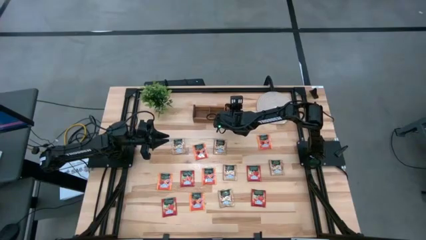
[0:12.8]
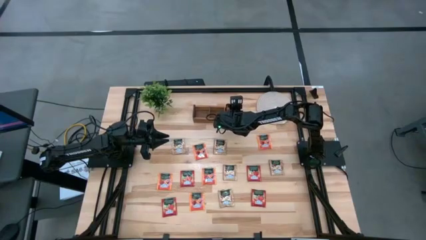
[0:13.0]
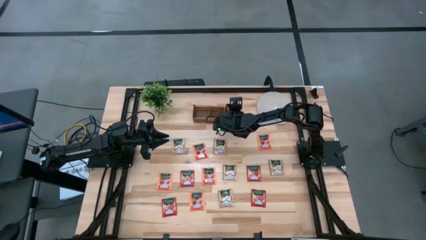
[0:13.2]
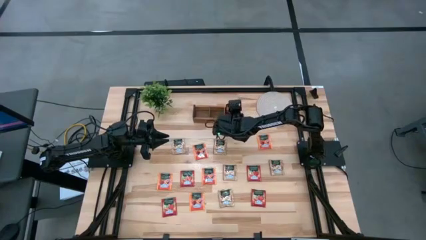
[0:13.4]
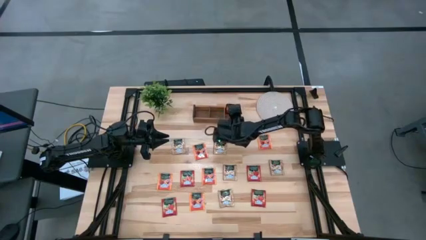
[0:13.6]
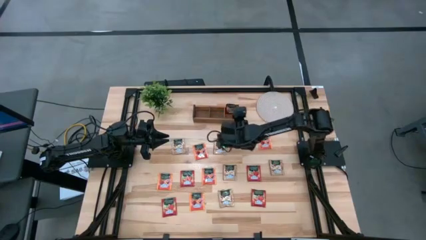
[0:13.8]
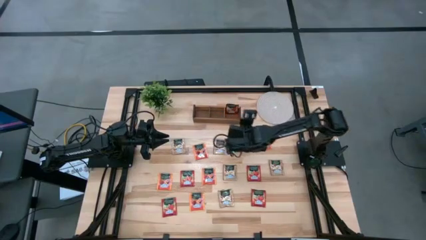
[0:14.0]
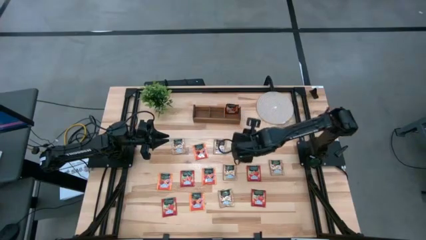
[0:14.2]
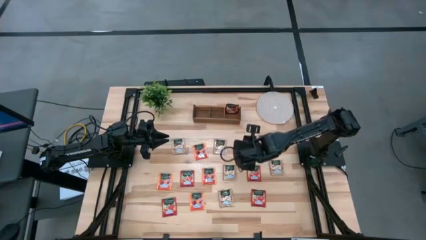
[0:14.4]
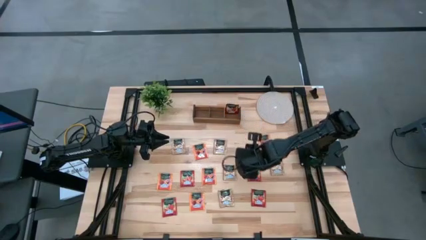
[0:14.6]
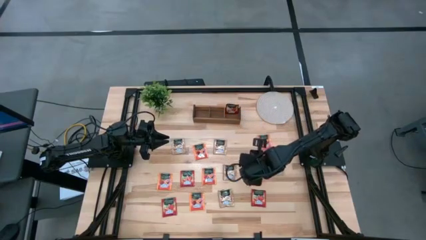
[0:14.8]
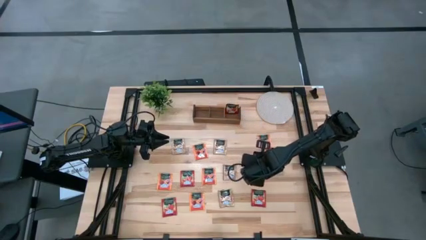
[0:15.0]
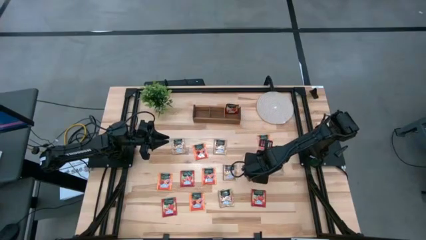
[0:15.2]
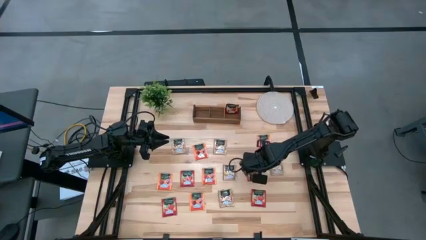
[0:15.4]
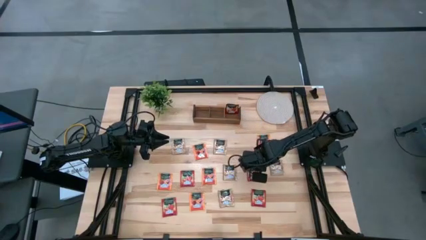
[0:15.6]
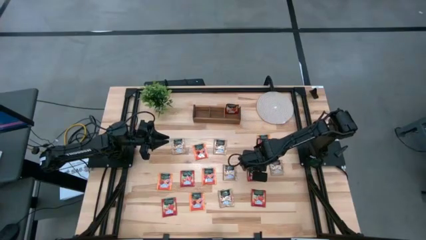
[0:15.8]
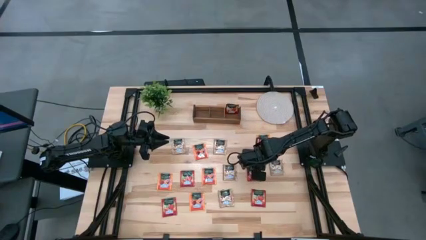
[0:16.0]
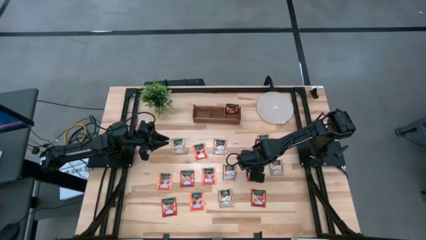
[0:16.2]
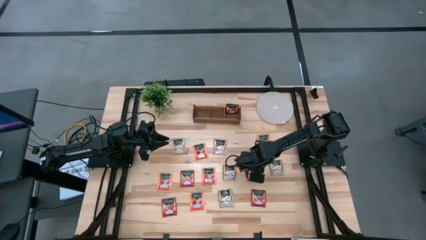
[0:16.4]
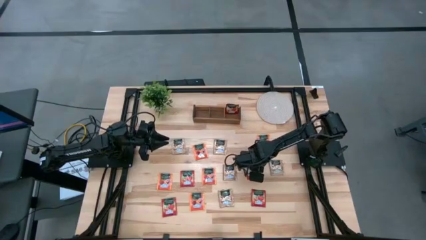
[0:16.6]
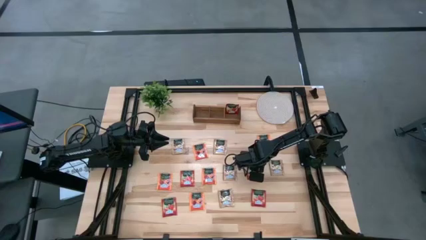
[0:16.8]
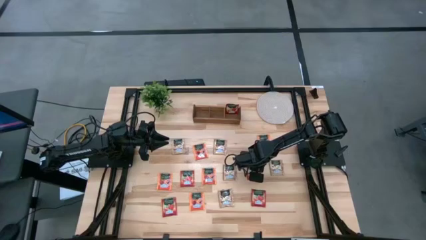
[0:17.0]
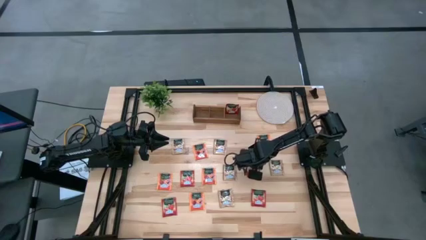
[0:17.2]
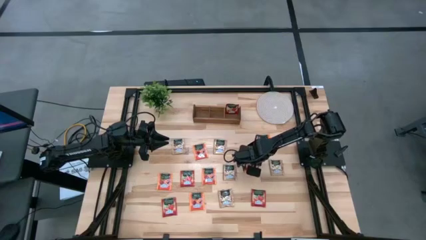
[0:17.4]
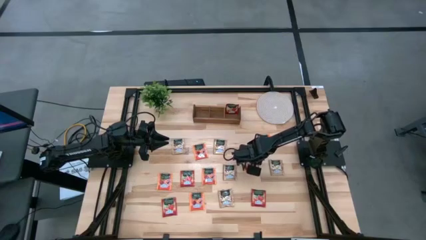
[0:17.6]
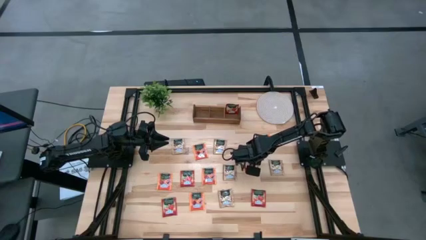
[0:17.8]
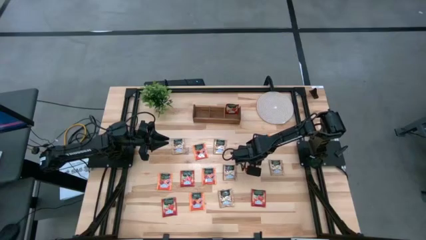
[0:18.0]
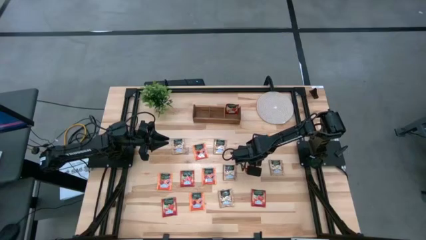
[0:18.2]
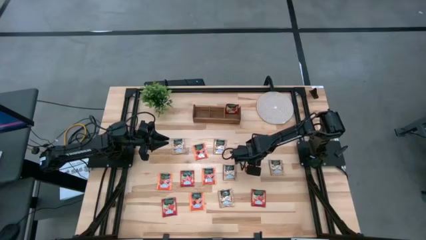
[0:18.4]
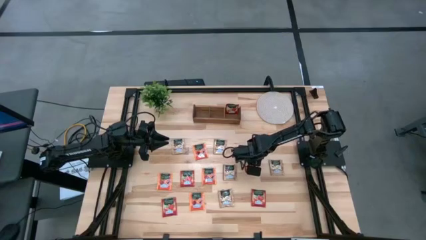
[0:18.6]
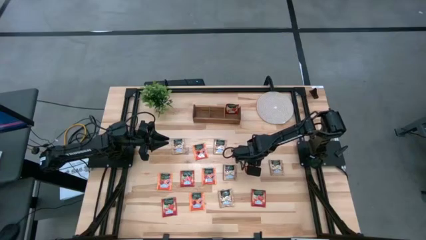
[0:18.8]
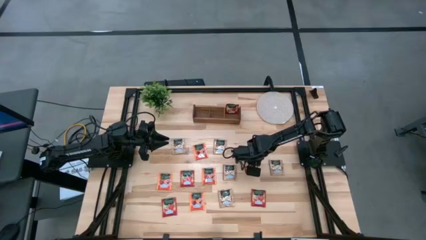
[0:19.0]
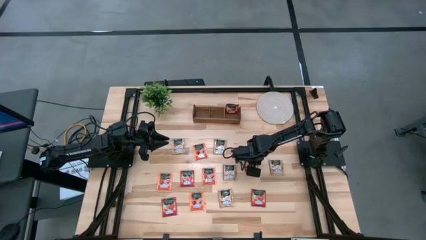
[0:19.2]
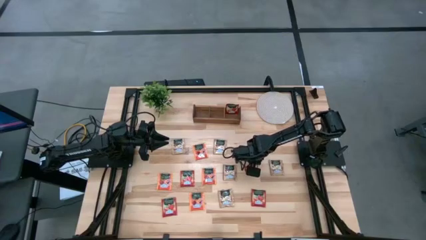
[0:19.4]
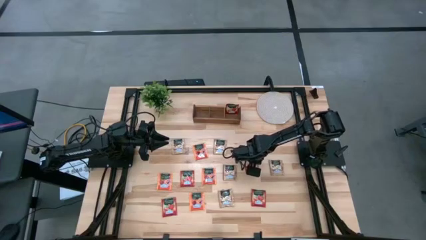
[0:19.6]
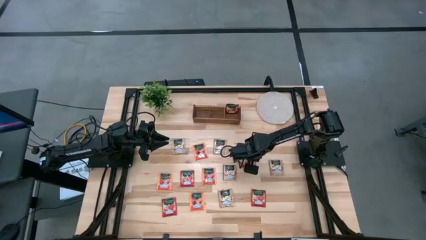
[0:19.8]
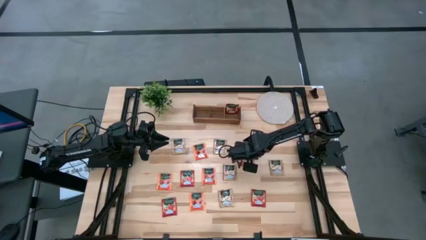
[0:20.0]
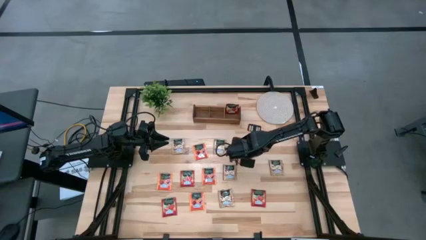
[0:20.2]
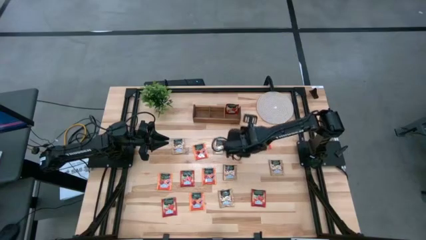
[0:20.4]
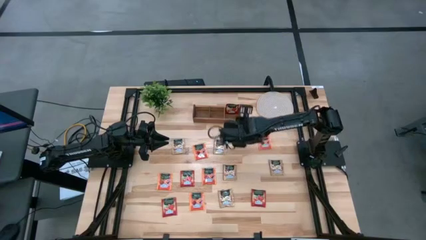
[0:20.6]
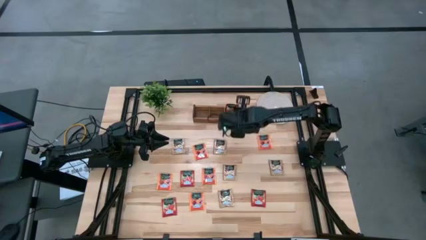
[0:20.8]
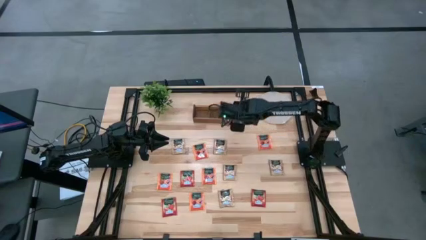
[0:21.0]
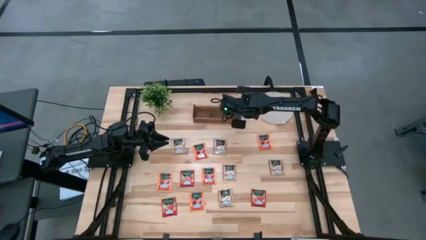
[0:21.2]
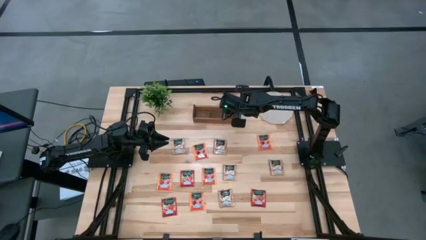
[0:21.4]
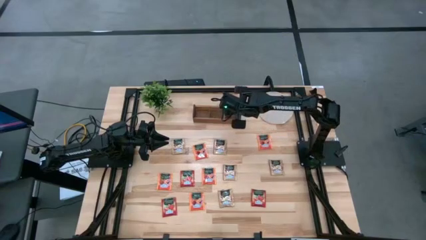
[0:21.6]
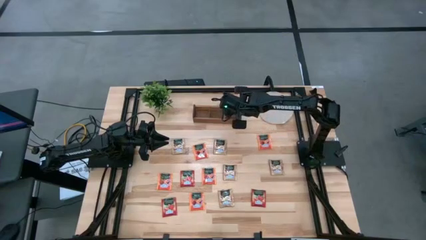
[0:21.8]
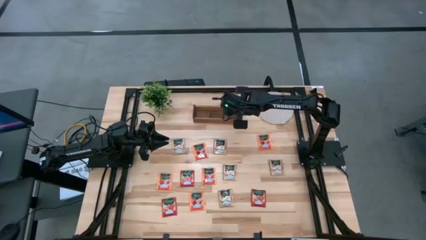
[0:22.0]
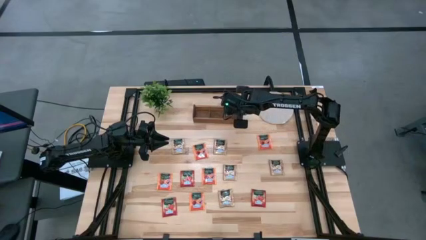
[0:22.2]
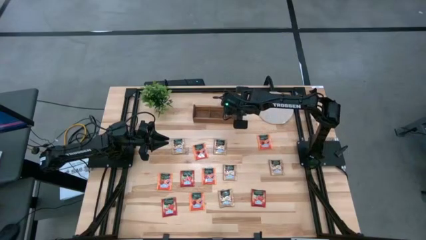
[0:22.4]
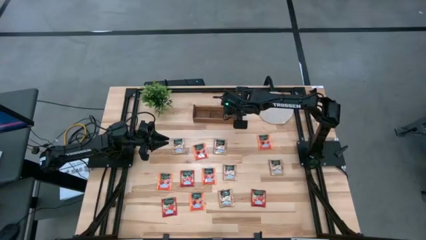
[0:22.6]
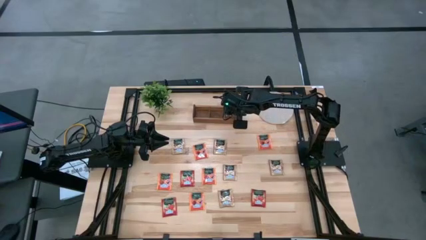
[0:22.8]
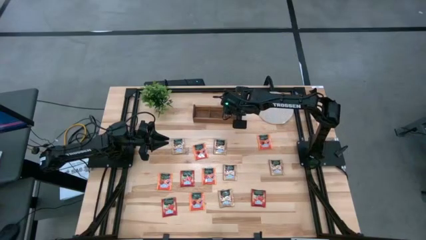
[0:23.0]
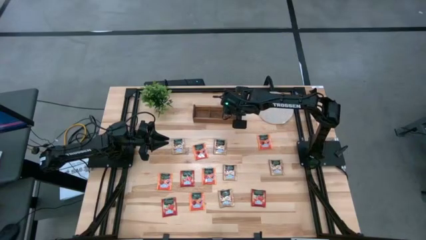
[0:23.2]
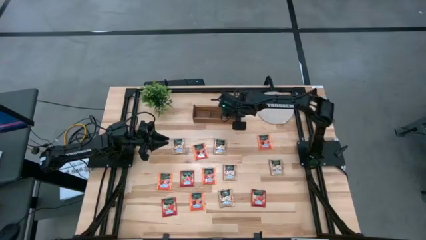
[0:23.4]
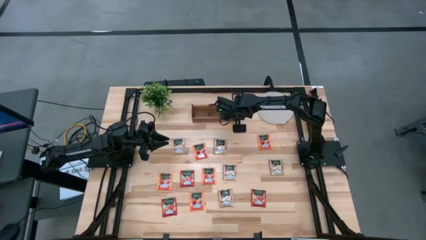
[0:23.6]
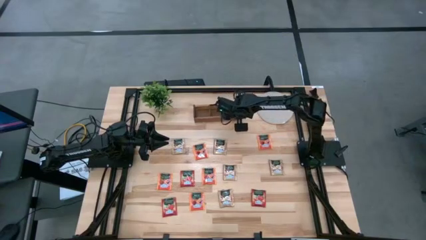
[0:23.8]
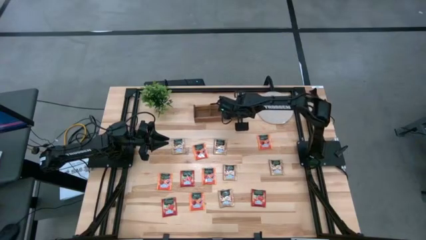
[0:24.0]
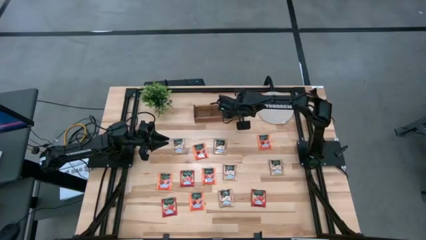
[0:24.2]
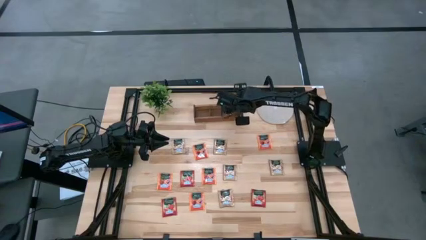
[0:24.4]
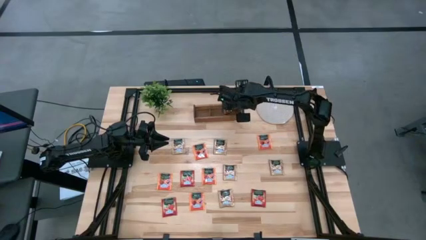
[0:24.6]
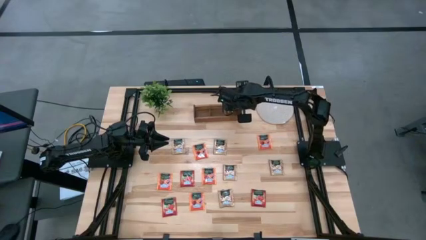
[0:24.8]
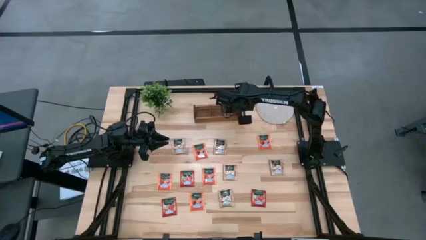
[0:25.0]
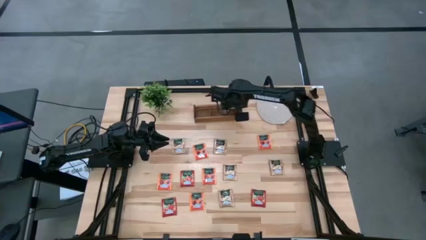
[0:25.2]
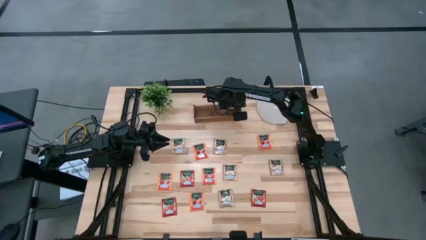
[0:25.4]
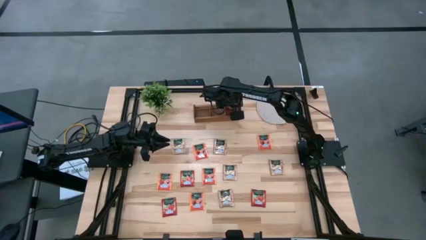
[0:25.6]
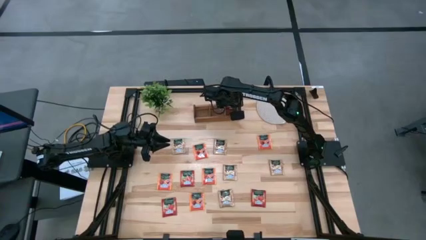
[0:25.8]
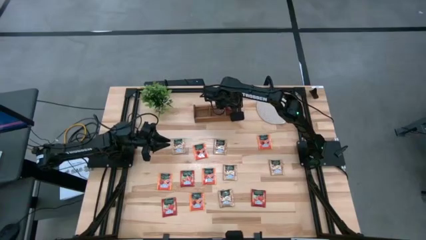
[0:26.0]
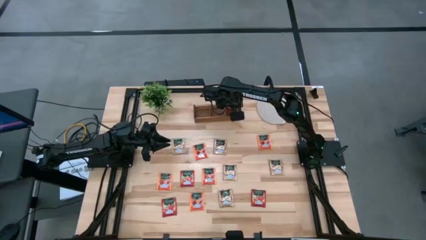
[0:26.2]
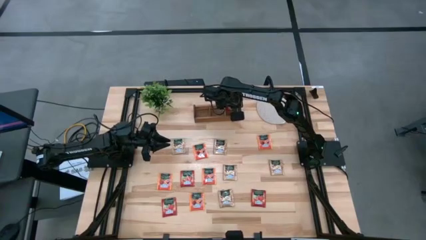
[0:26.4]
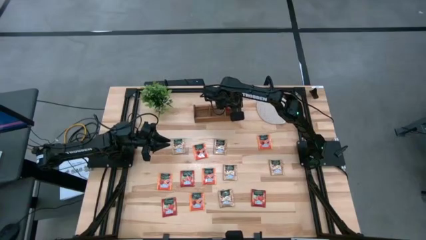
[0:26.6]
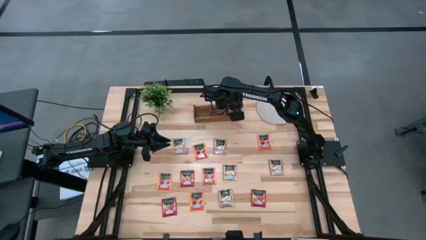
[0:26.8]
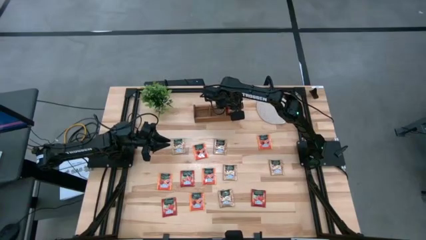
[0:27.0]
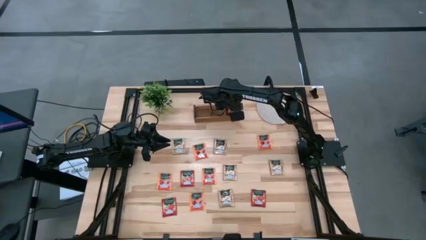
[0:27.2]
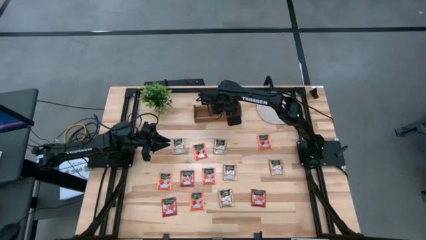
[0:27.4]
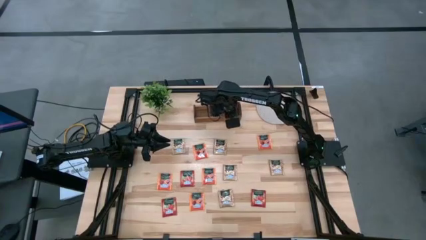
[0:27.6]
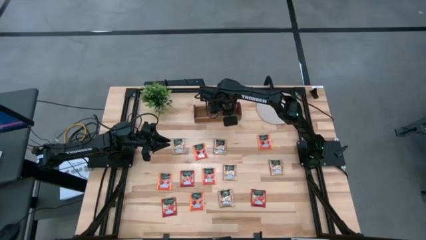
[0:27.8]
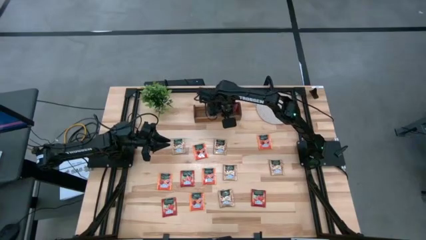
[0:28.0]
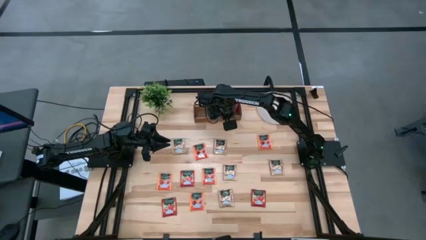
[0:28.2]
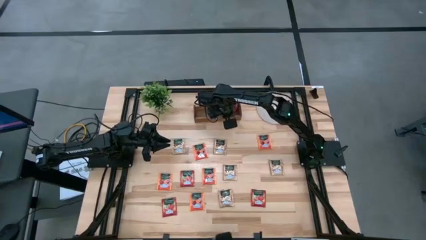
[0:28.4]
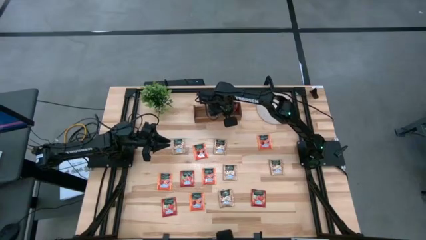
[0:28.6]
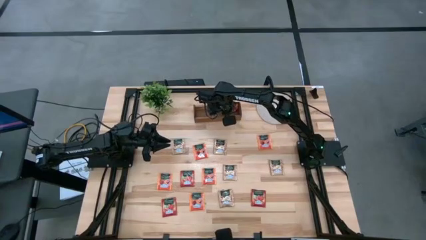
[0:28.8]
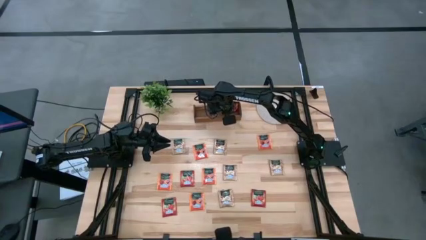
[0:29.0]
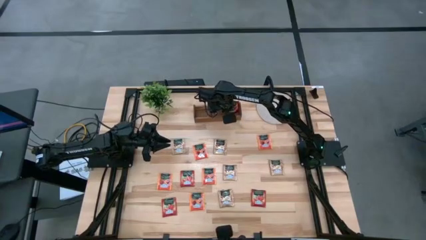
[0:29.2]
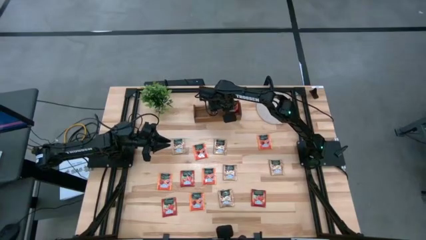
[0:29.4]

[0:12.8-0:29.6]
Task: Pick & Place Tea
Put the red tea bag into the right section of the wooden organizer
